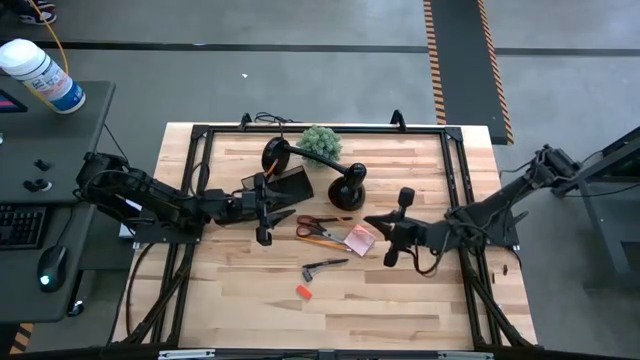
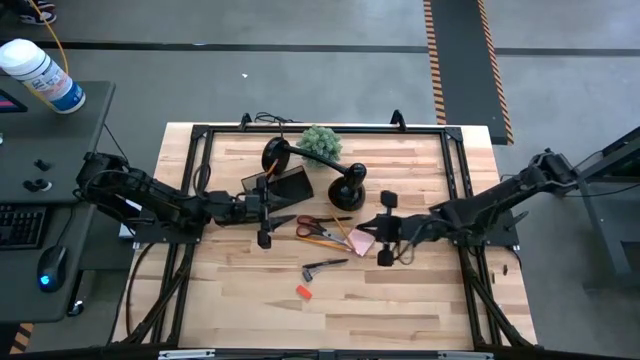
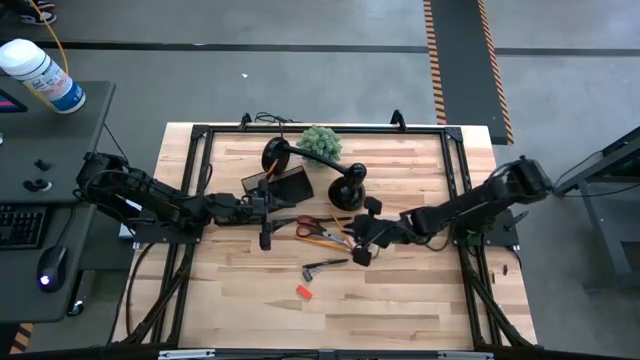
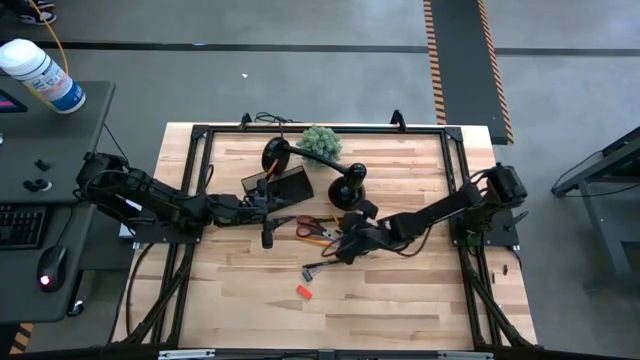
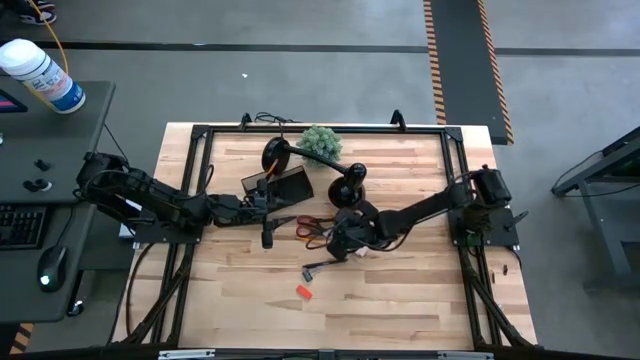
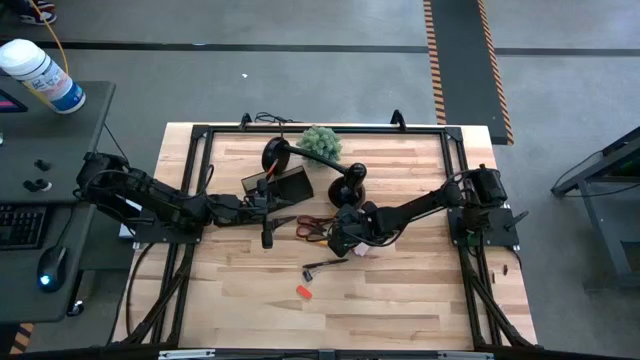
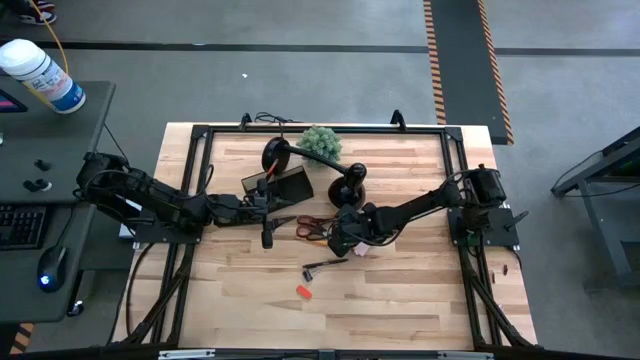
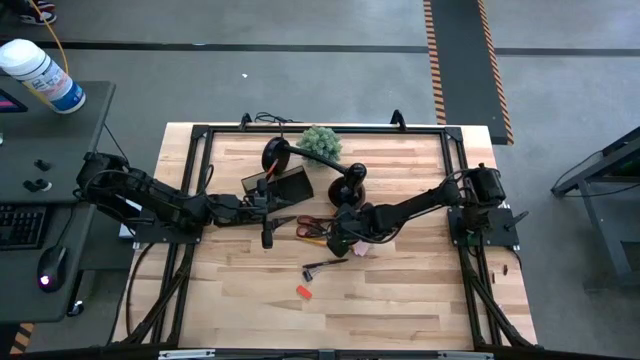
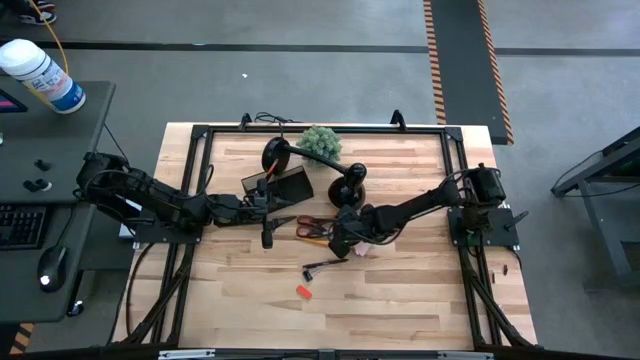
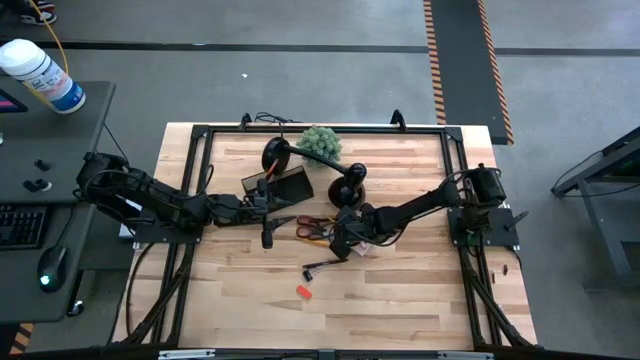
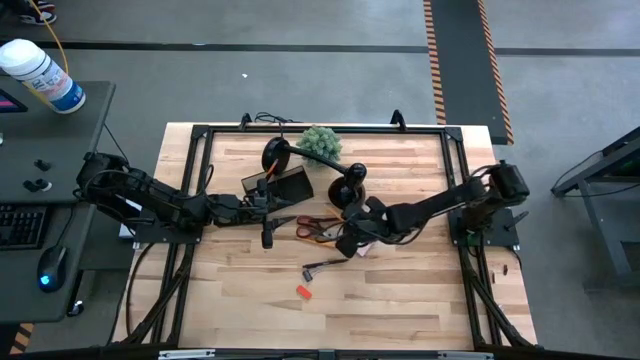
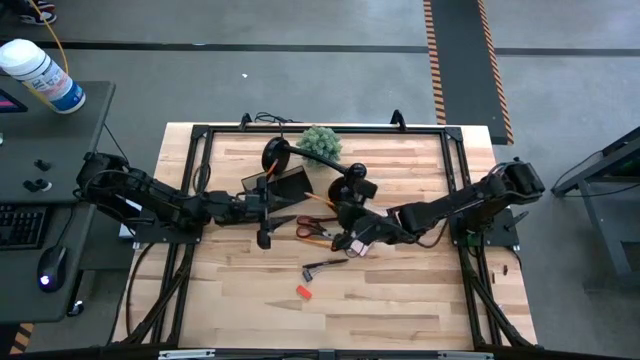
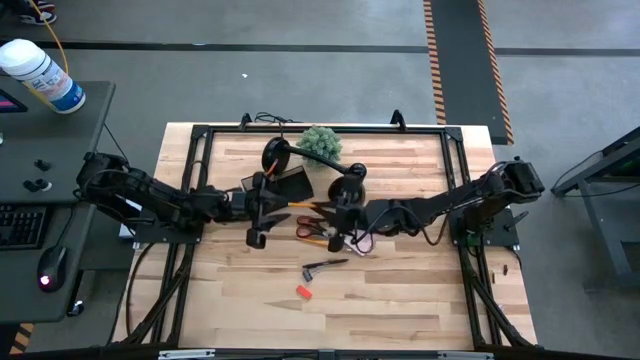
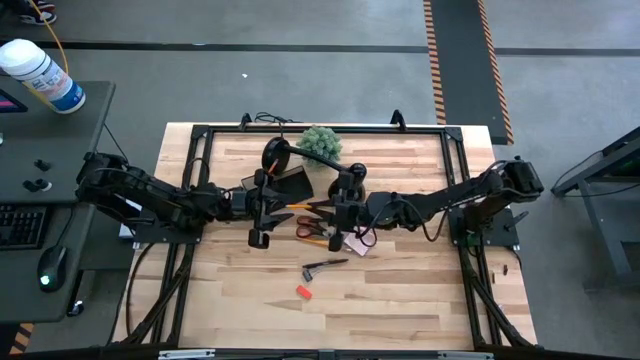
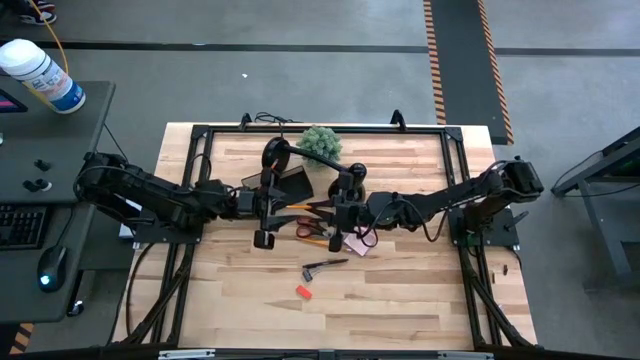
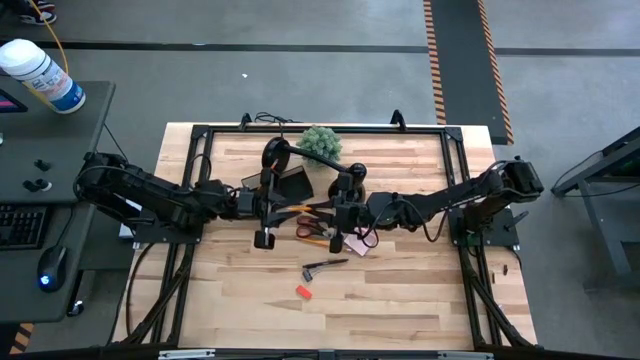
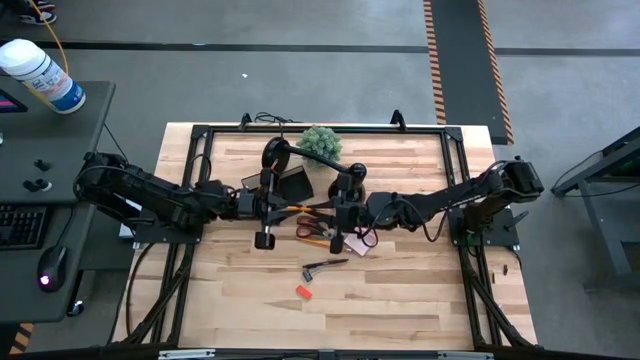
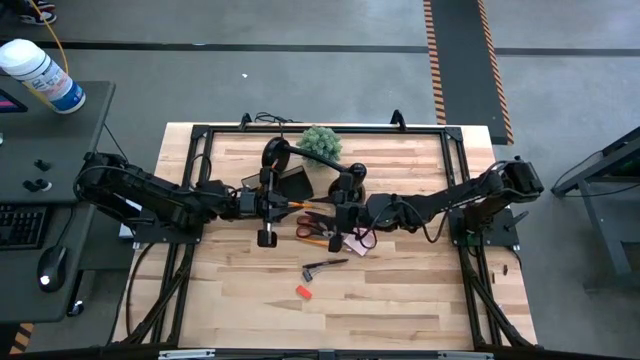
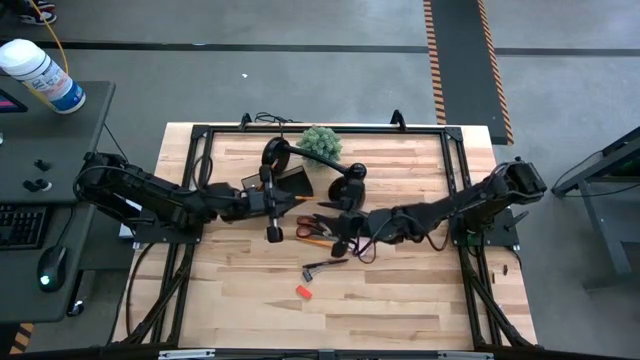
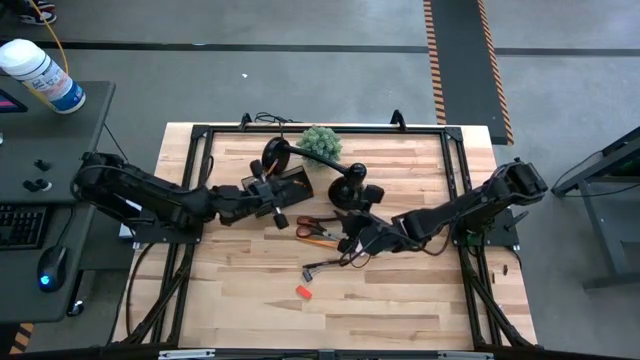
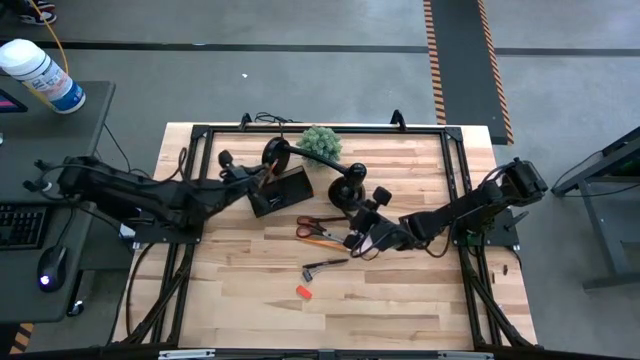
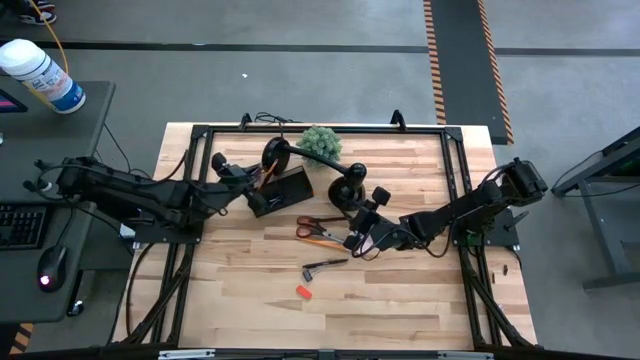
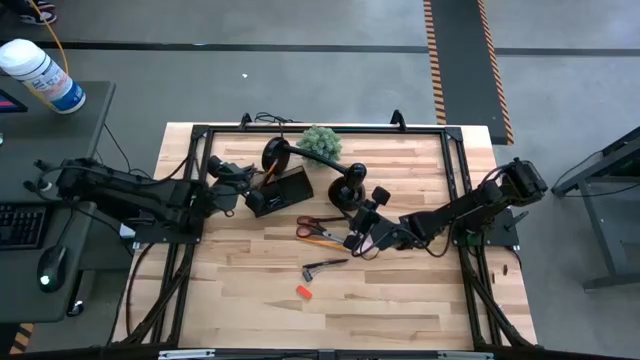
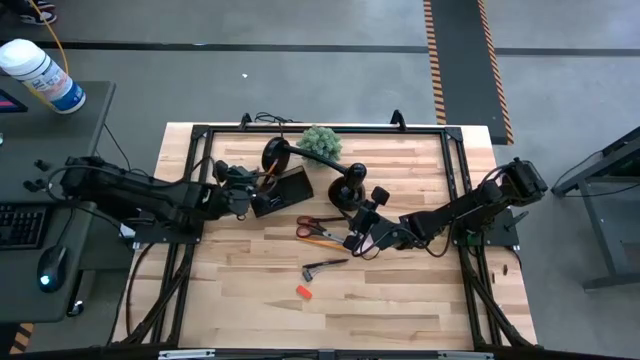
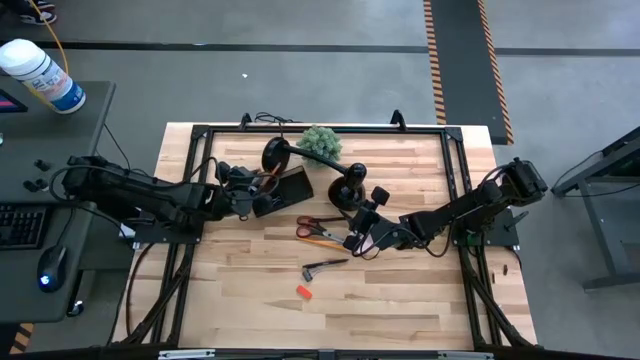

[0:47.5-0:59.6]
Task: Pick and place office supplies into organizer
Put the right orange pencil into the black desk organizer

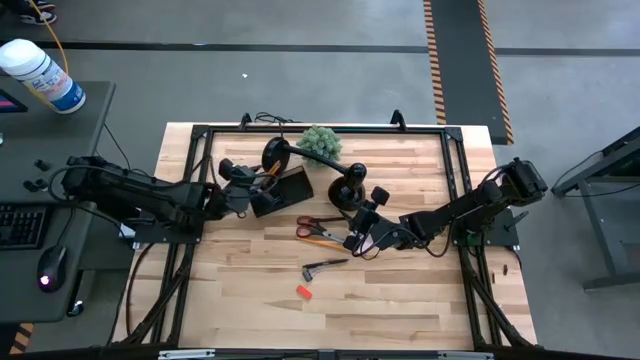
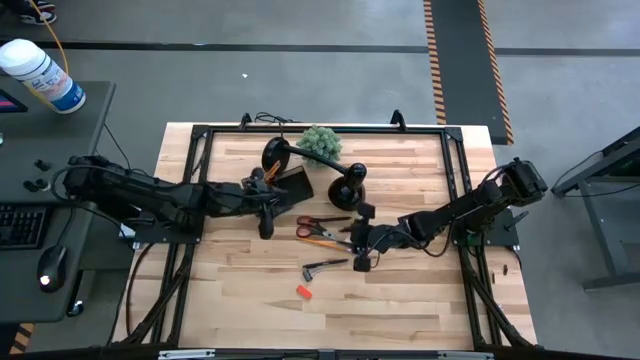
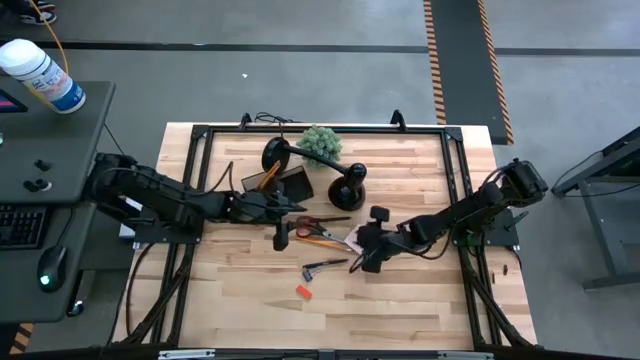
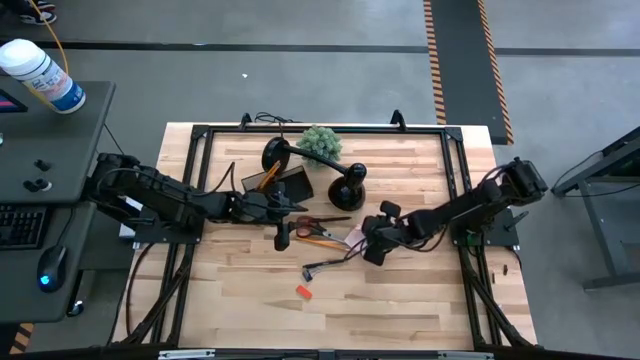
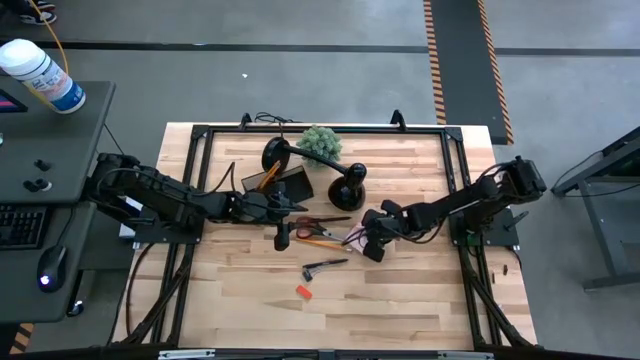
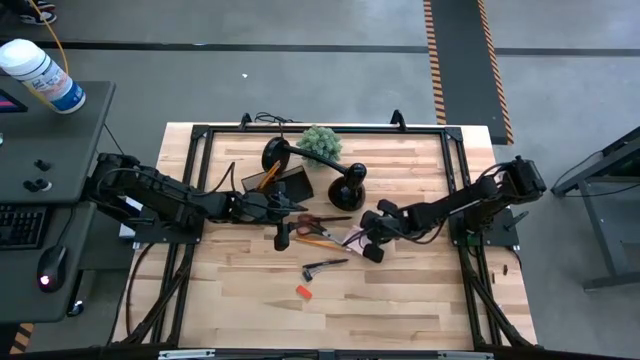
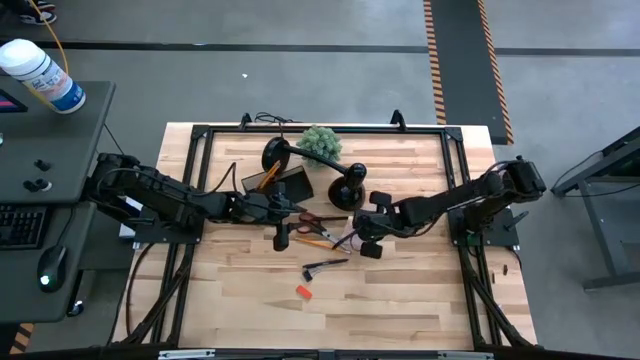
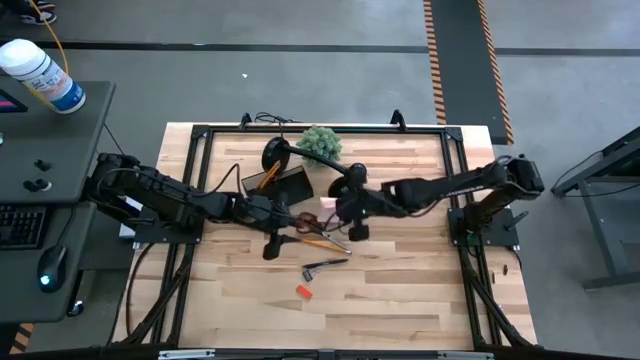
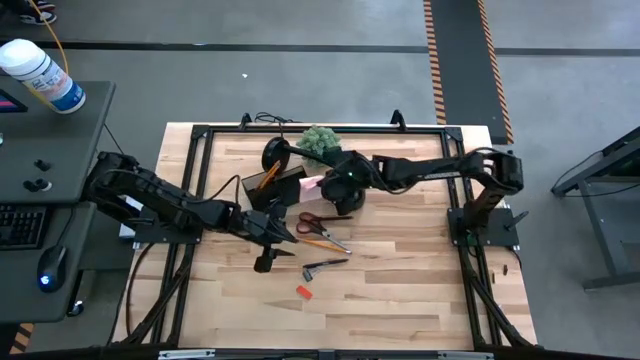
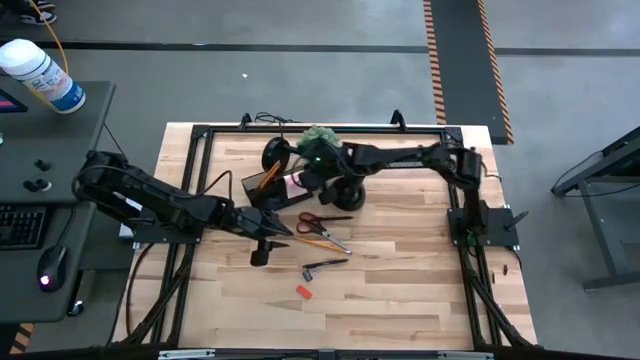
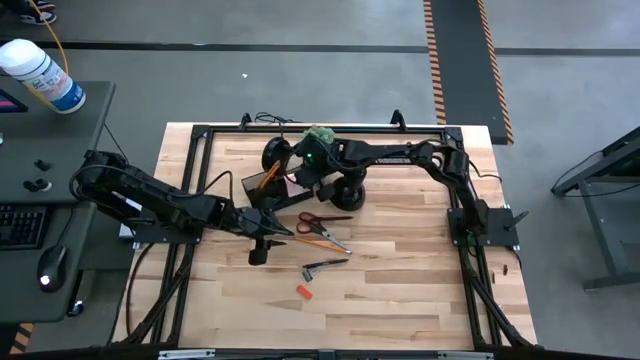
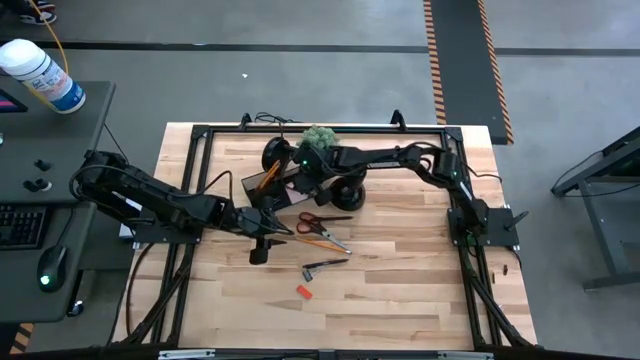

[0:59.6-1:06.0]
Put the pink sticky notes into the black desk organizer

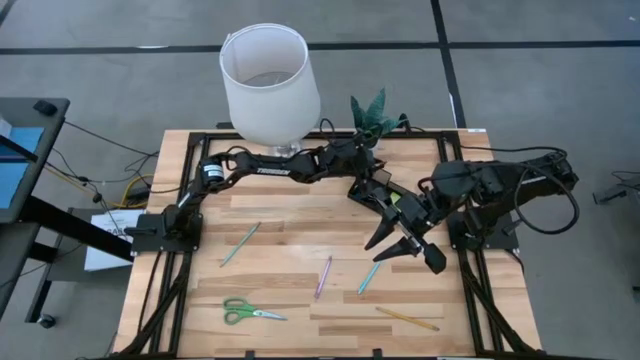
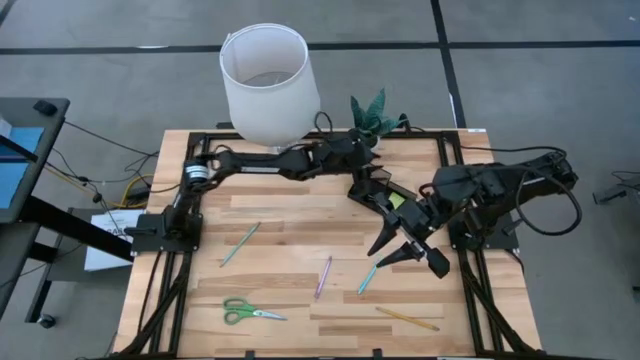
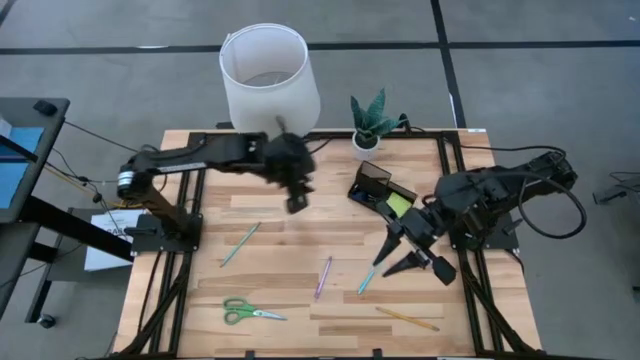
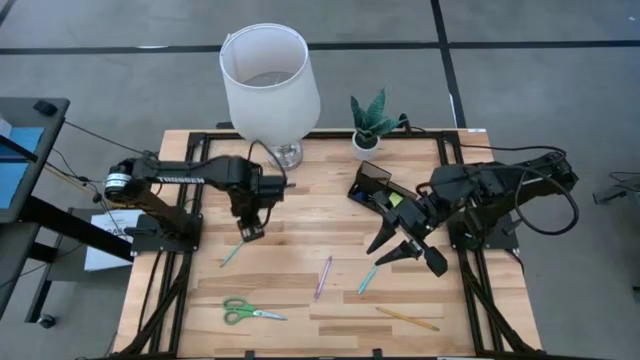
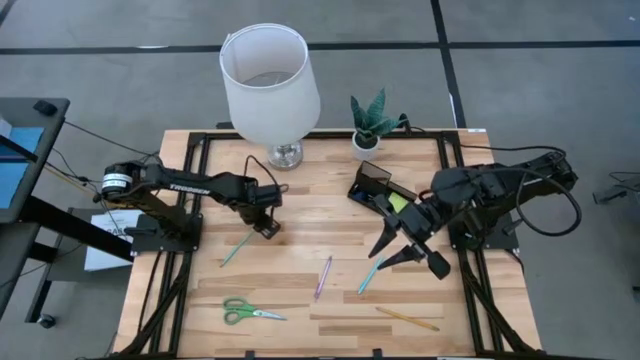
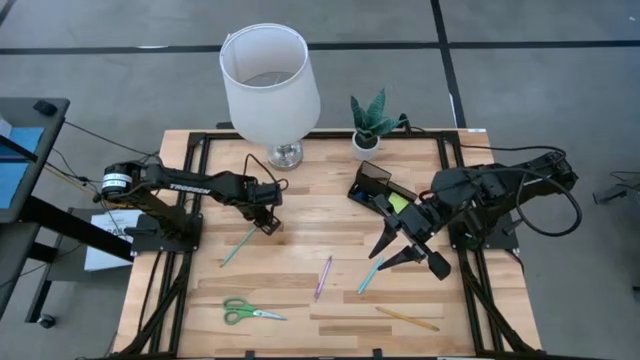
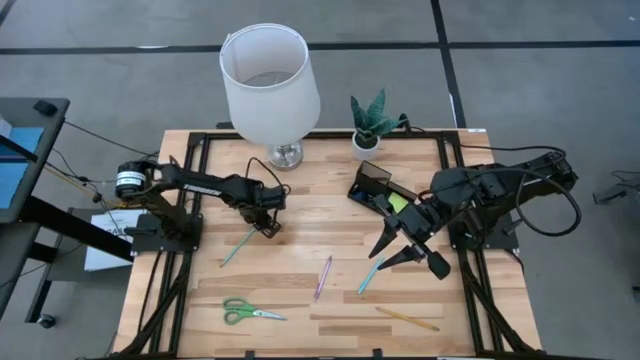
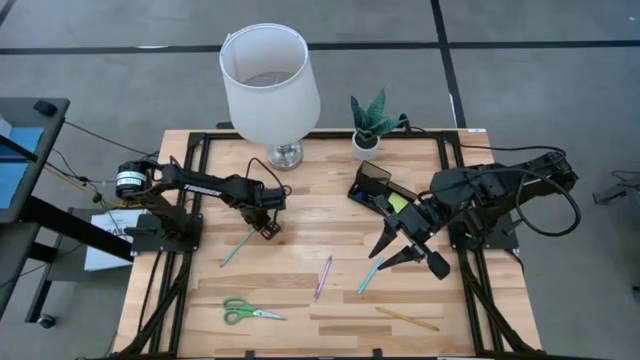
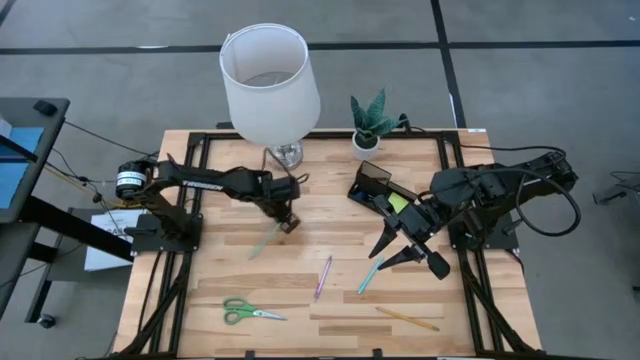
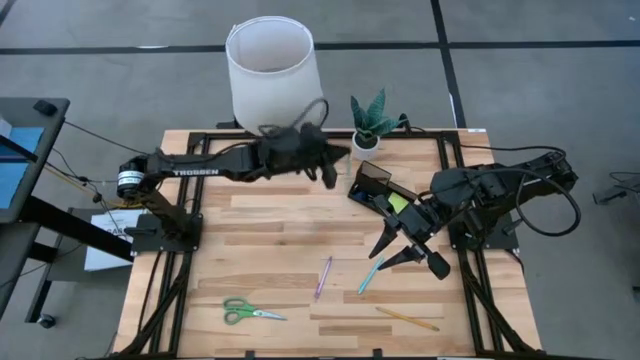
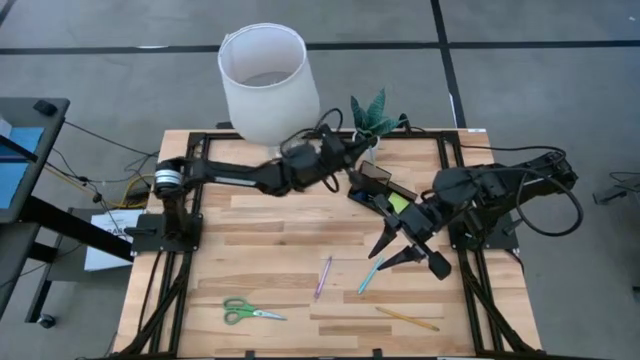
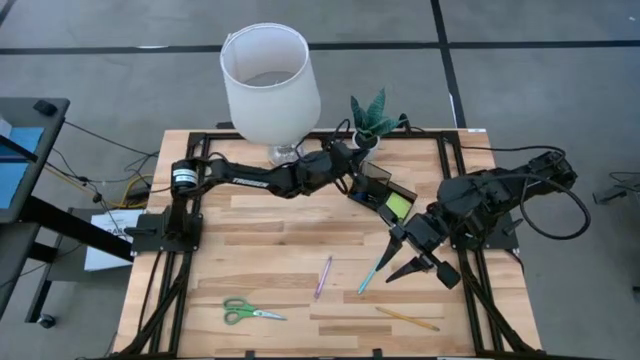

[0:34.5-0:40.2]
Task: Pick and place office supplies into organizer
Put the light blue pencil into the black organizer
